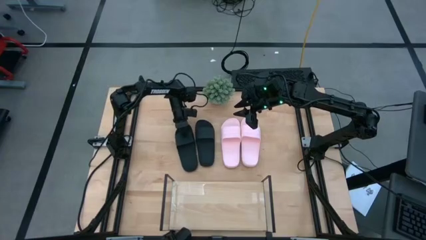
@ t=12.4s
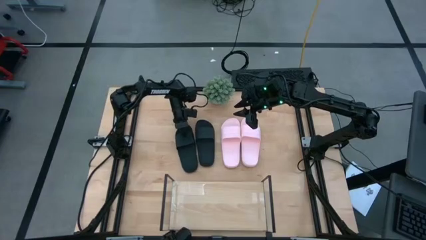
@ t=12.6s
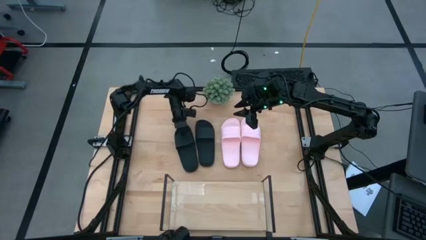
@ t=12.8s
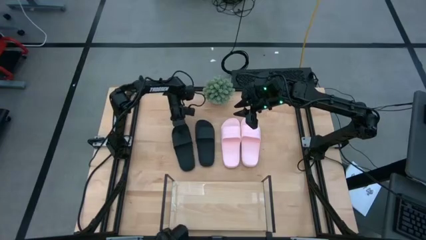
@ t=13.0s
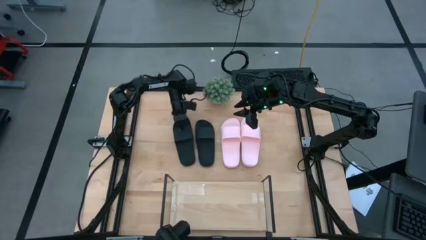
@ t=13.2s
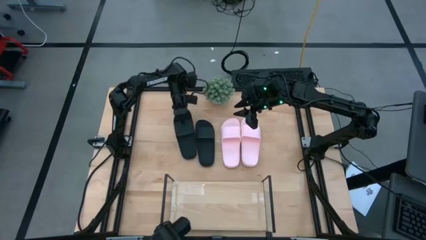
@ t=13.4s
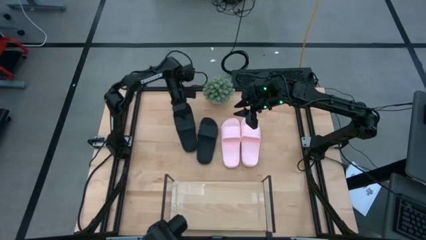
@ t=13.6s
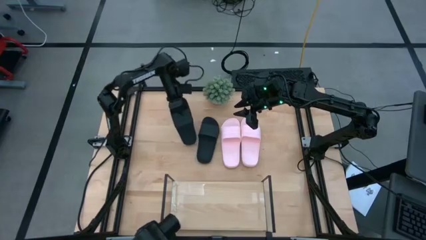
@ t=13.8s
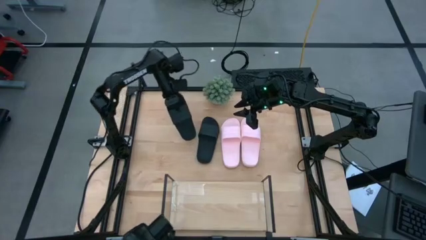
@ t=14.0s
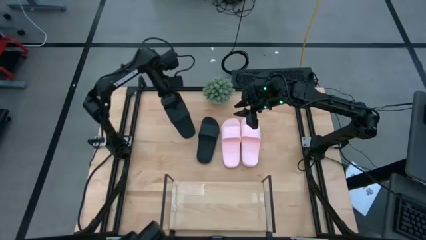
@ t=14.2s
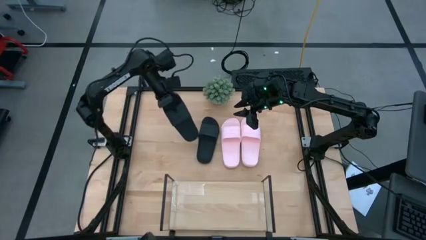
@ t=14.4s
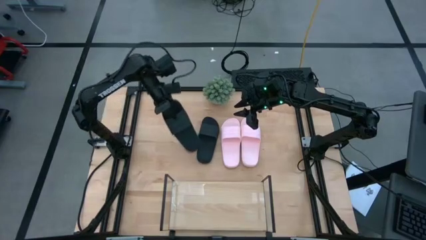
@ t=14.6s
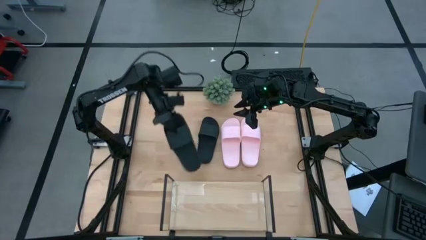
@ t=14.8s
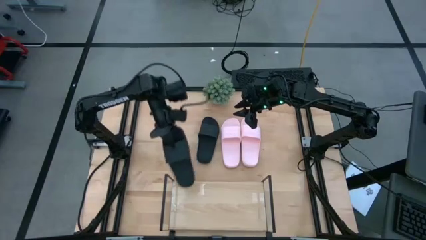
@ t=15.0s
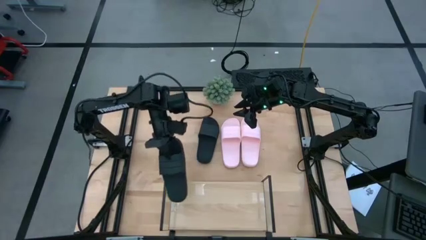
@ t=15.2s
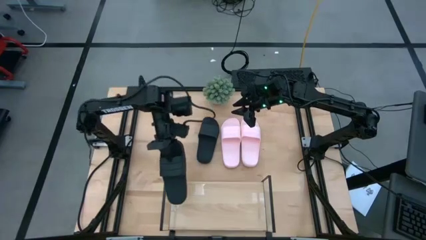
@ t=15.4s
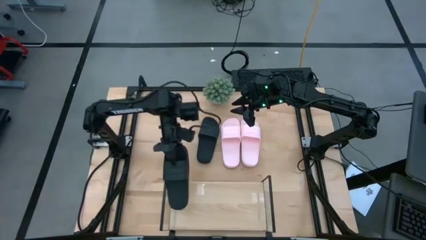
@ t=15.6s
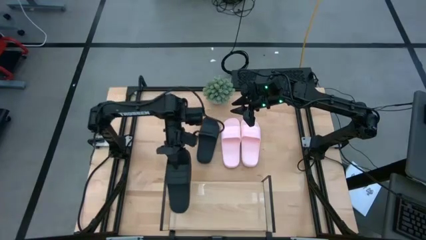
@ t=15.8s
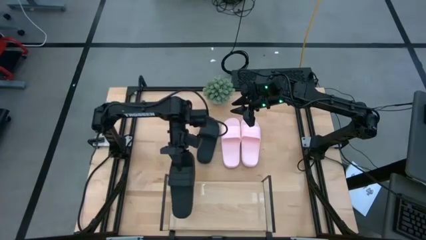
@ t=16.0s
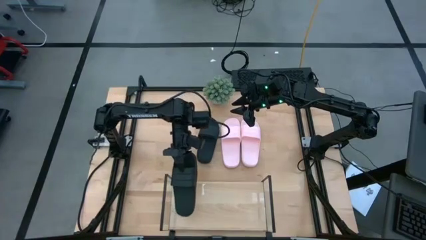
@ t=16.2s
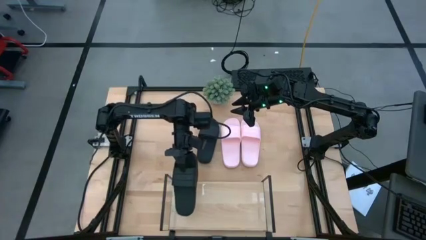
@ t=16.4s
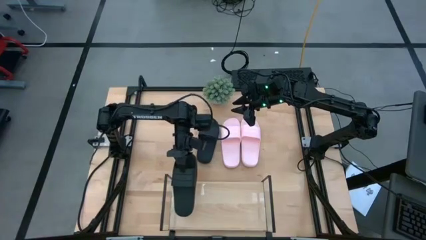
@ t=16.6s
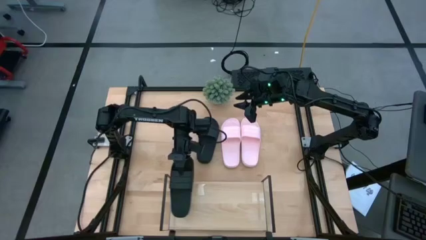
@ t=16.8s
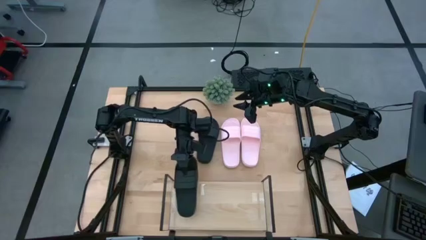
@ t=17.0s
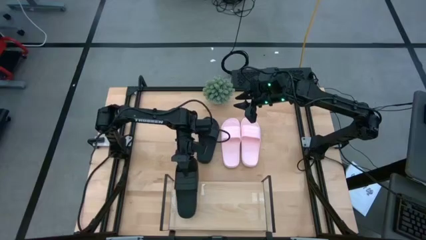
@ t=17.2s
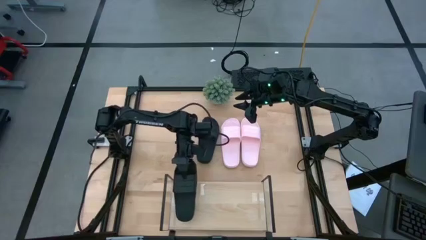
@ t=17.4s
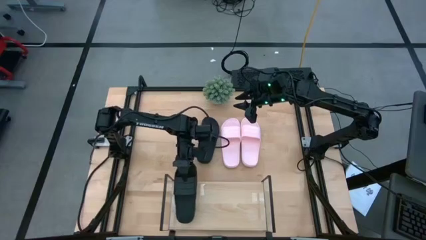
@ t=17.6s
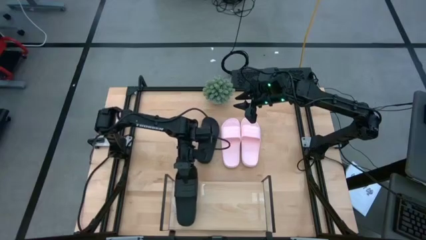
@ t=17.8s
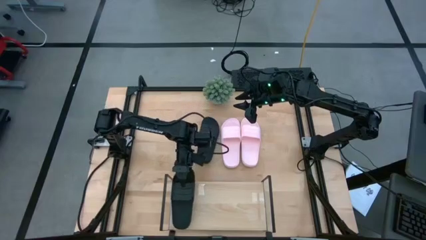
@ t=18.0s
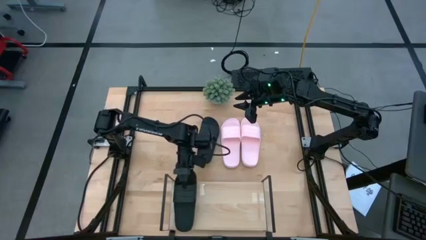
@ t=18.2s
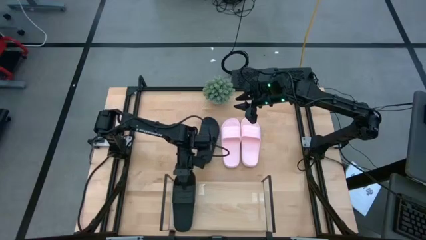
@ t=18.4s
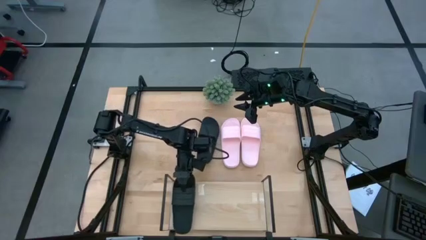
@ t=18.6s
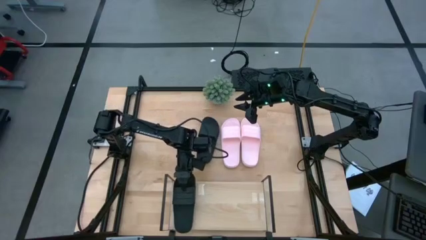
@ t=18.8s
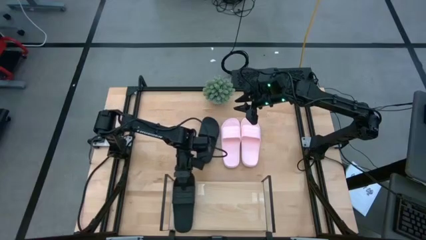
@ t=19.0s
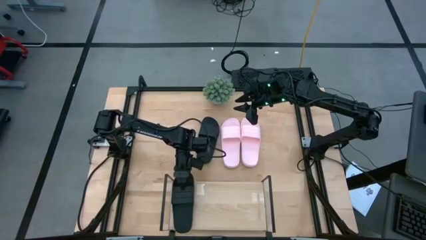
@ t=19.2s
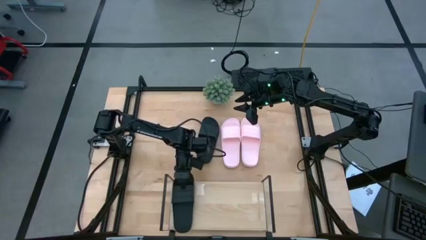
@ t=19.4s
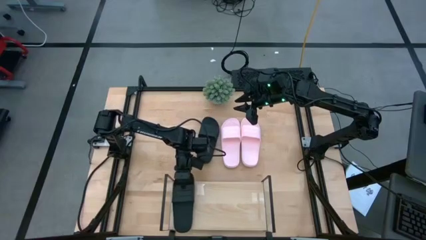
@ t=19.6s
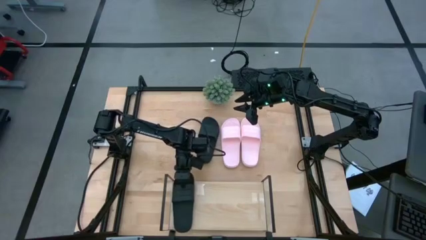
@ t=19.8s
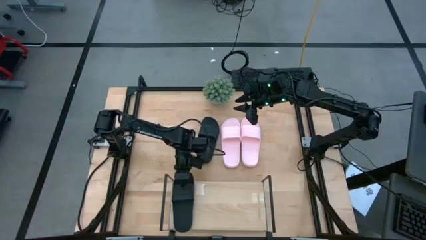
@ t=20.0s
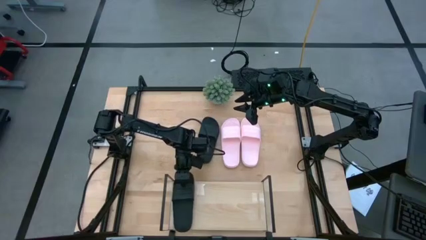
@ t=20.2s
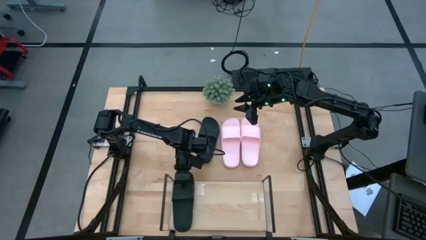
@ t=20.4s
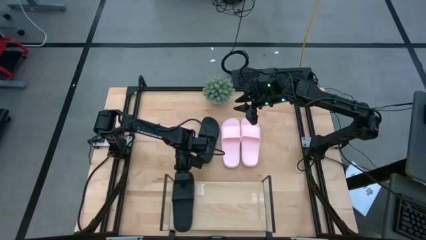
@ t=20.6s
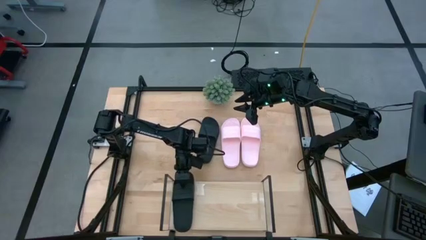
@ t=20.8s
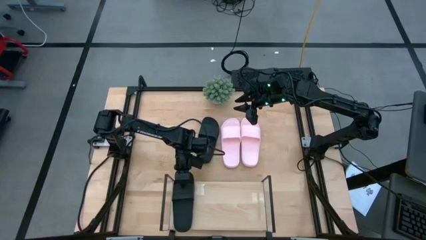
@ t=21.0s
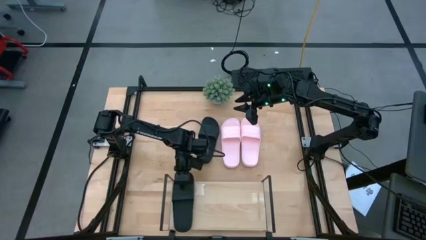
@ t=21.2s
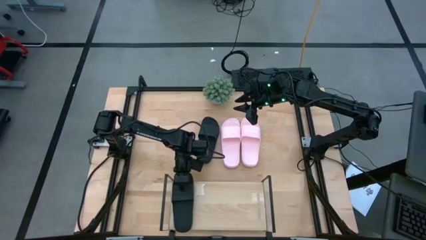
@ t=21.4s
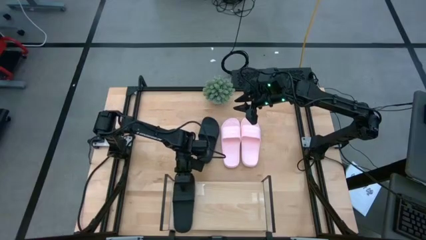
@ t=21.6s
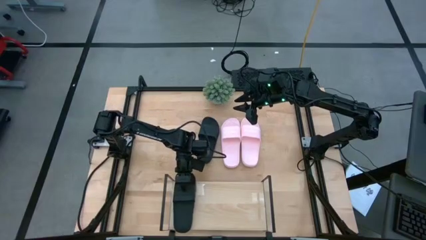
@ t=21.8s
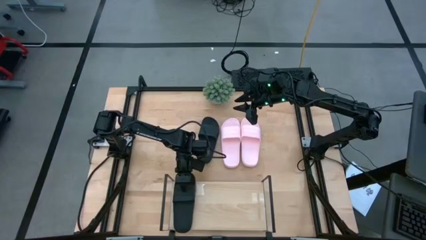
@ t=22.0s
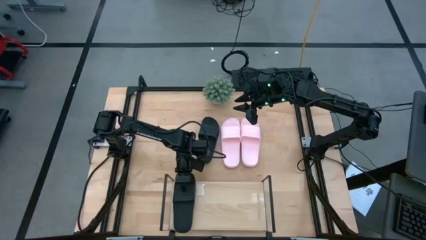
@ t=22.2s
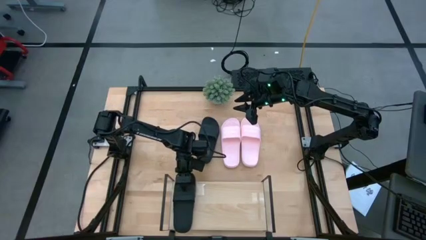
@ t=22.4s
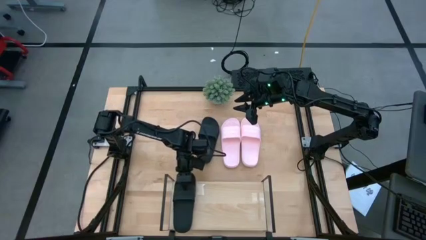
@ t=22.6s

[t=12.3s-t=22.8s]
Task: Pick and place slides into the shelf
Put the left black slide on the shelf
